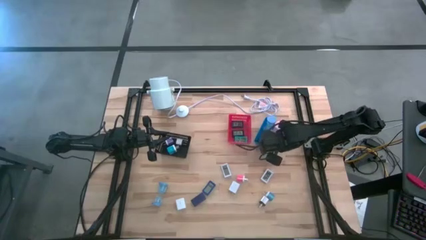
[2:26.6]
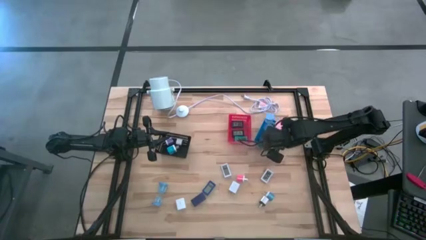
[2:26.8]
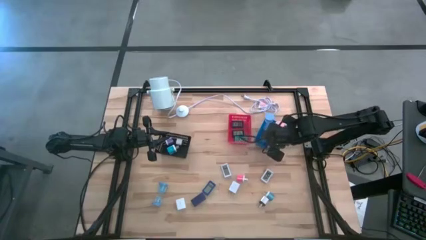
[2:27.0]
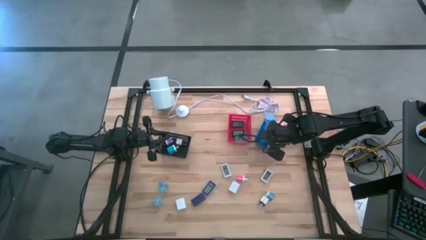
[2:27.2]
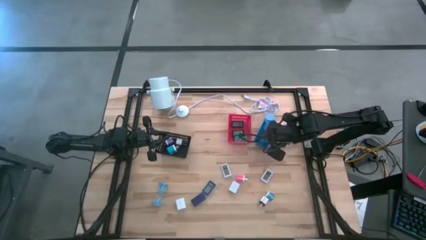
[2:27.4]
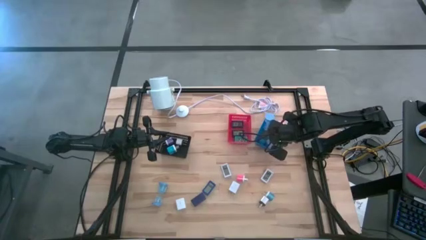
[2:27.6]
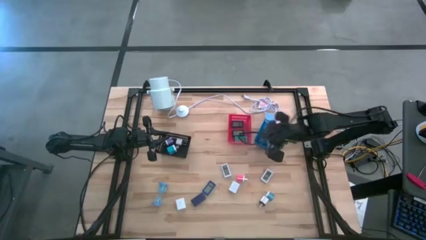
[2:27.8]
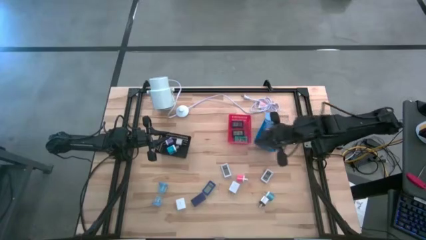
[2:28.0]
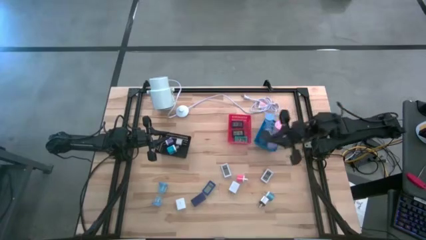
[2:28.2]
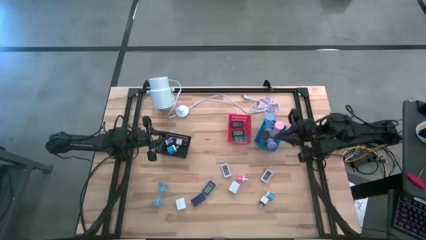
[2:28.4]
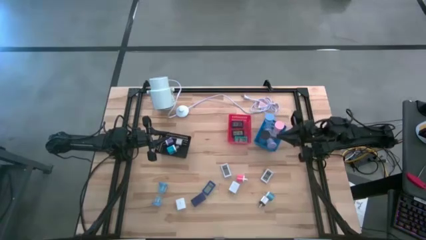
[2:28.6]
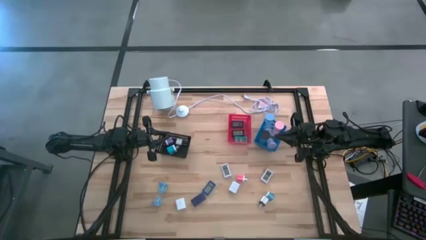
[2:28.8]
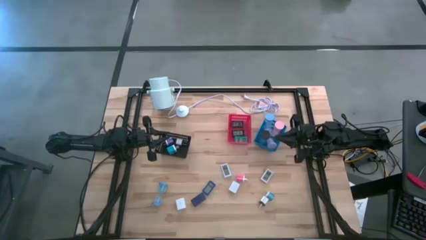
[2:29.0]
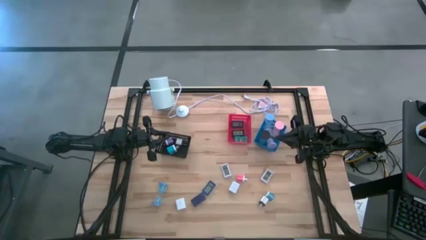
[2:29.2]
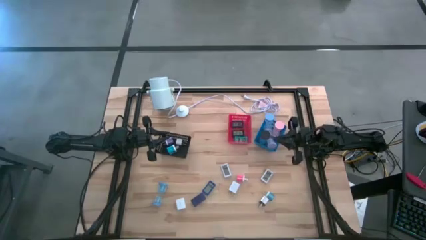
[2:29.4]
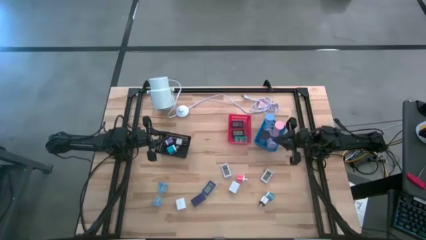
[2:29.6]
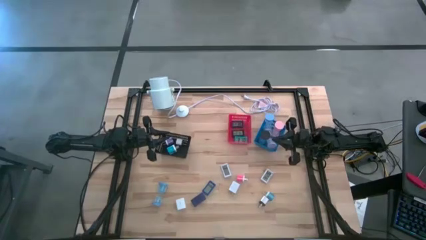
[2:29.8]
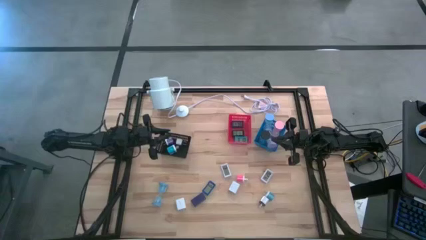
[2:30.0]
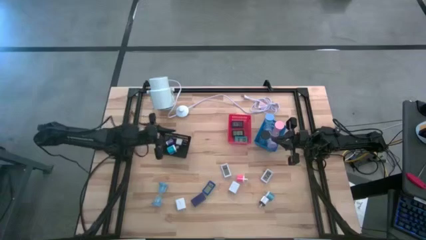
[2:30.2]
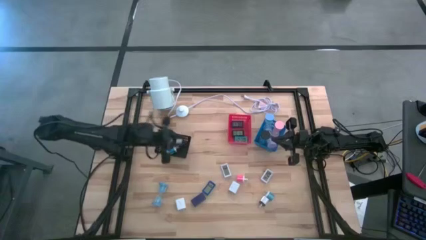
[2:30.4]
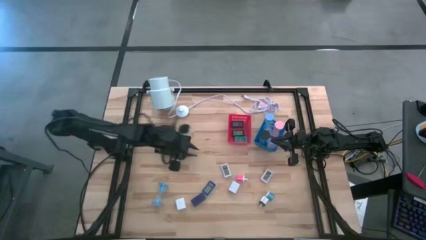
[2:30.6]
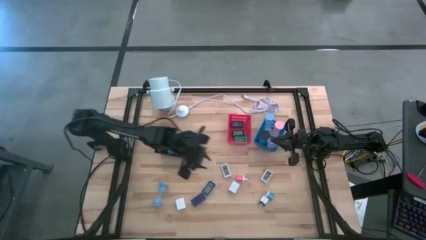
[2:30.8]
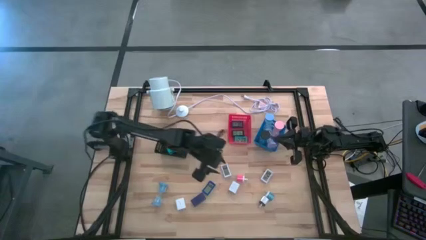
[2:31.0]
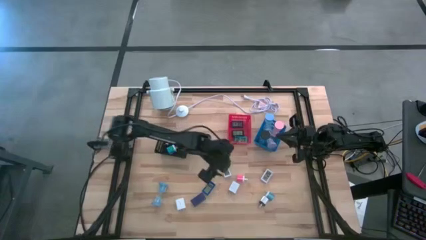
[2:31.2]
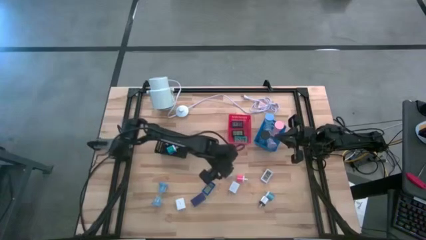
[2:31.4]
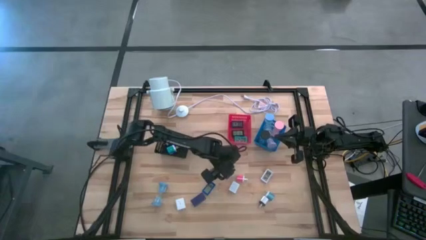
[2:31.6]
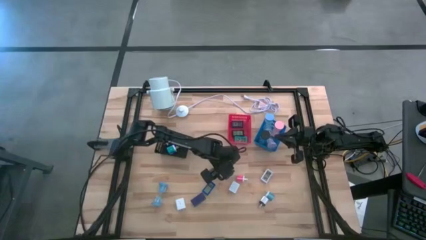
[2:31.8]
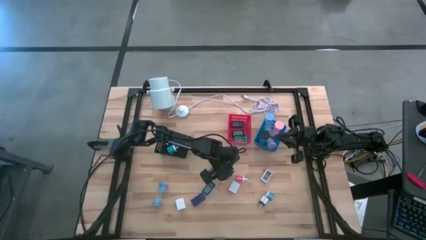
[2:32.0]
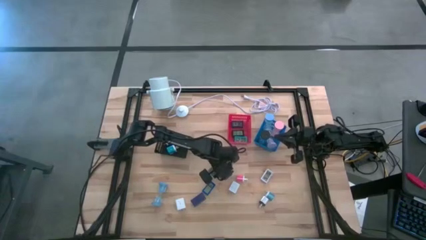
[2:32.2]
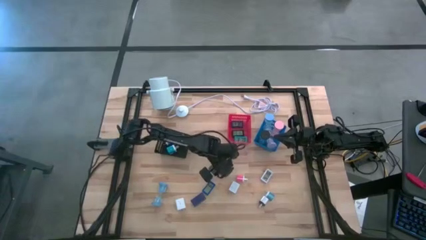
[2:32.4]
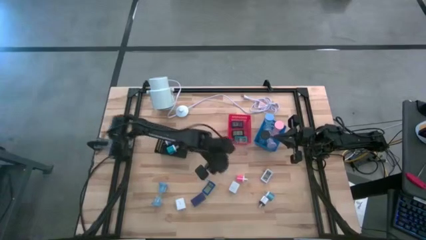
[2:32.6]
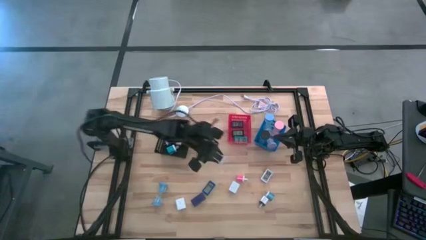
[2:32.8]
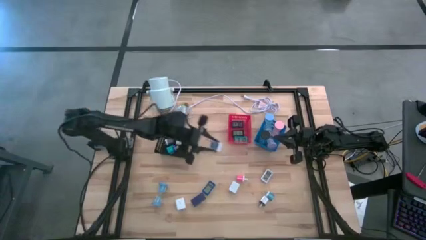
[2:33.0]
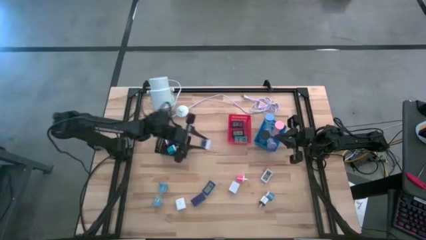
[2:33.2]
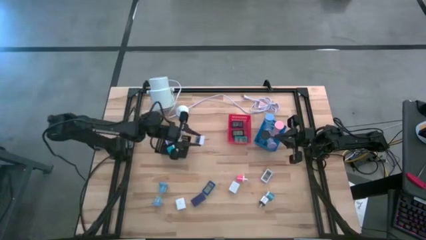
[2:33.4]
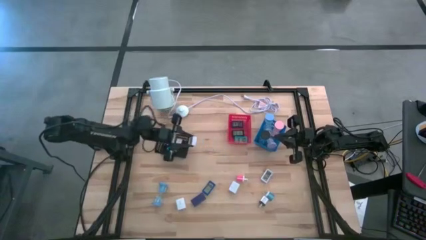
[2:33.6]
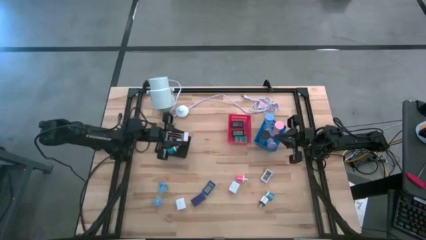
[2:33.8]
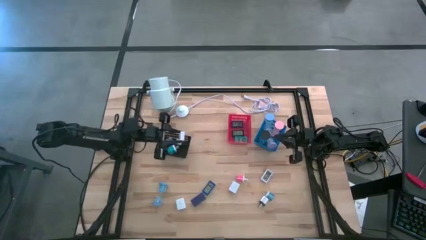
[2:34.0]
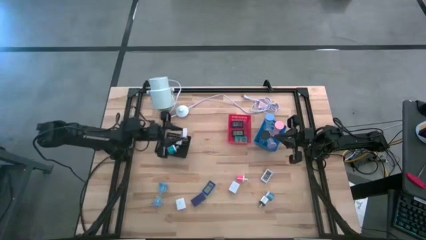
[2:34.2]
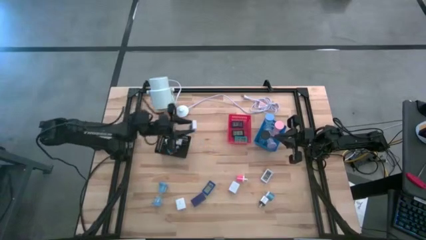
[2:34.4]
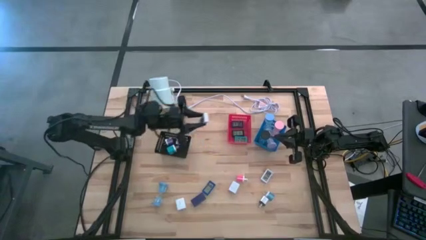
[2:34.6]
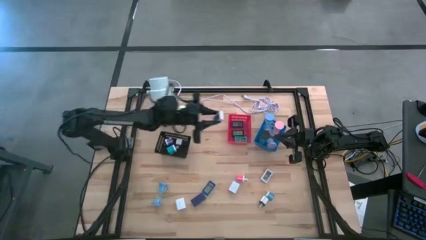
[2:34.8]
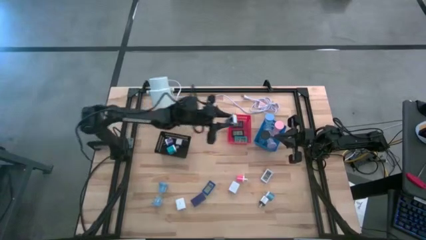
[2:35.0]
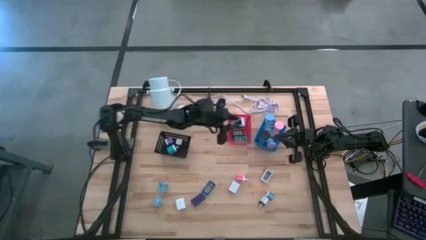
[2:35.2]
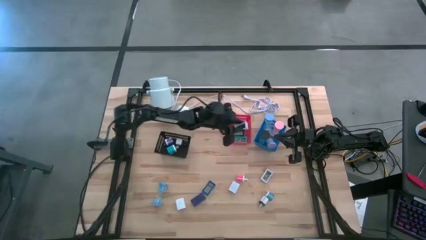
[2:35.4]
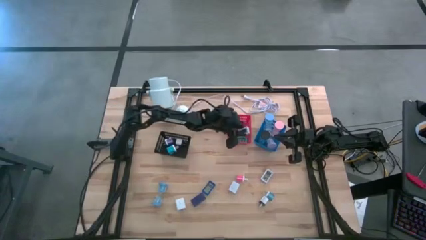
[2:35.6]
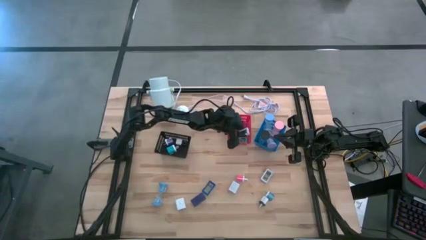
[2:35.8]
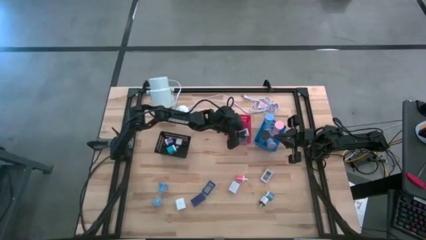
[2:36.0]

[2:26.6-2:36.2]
Task: Pick & Place Office items
Put the white digital clock into the red bin

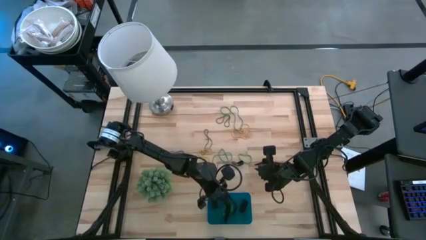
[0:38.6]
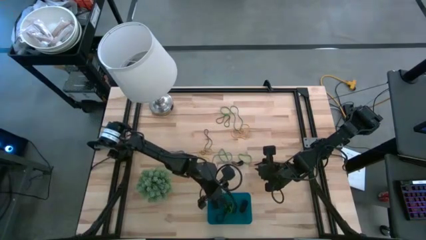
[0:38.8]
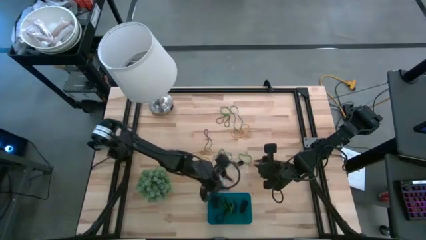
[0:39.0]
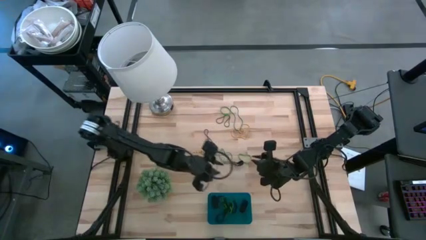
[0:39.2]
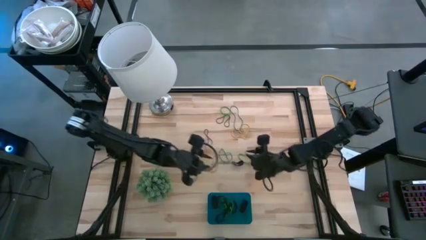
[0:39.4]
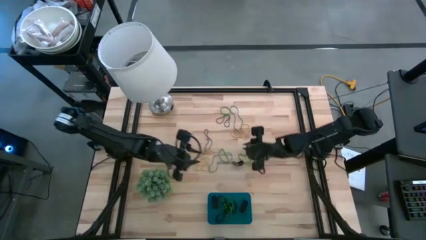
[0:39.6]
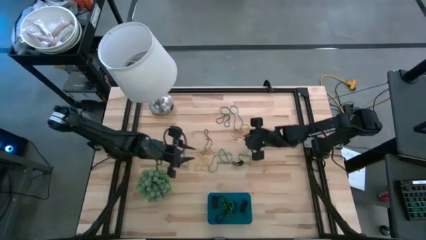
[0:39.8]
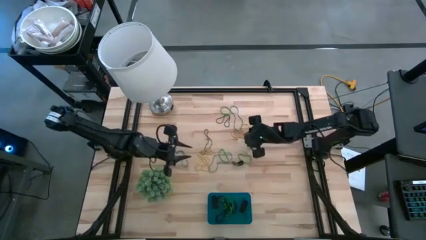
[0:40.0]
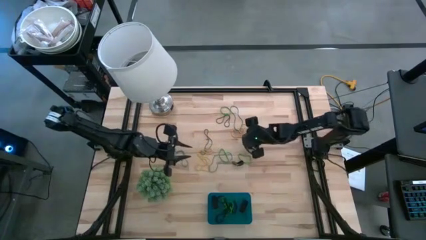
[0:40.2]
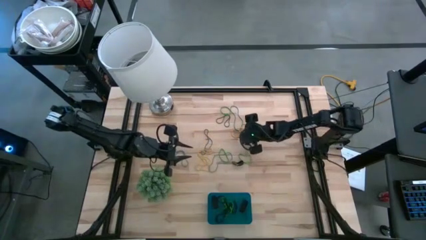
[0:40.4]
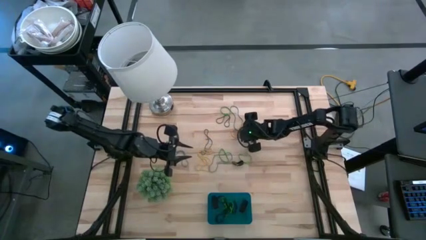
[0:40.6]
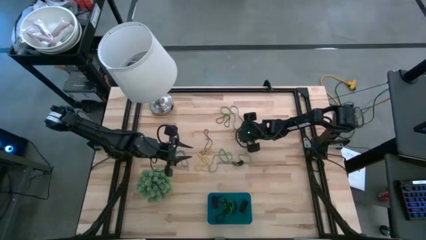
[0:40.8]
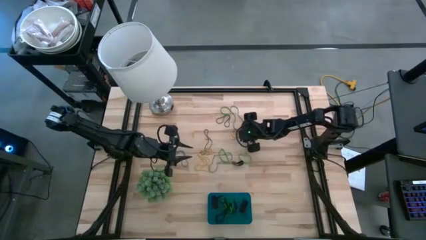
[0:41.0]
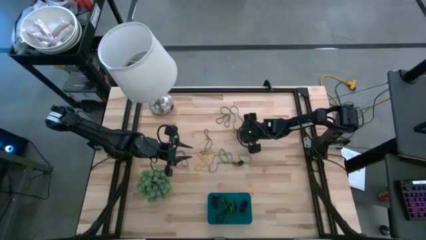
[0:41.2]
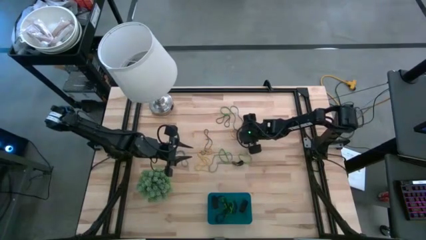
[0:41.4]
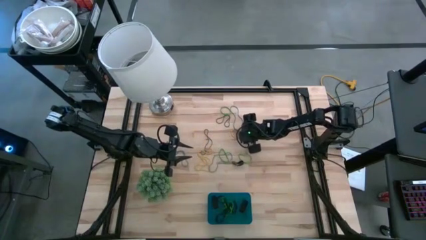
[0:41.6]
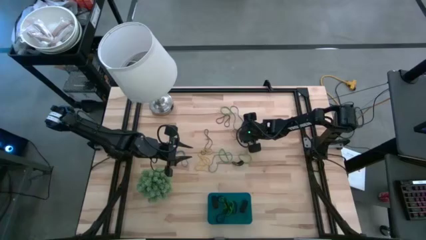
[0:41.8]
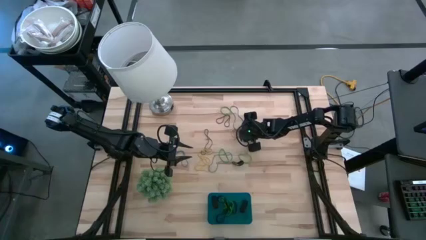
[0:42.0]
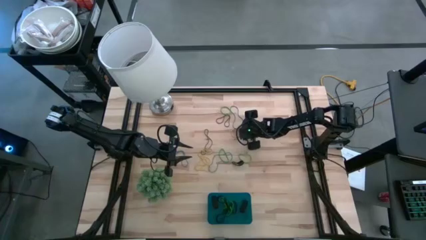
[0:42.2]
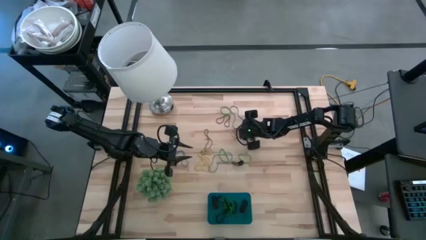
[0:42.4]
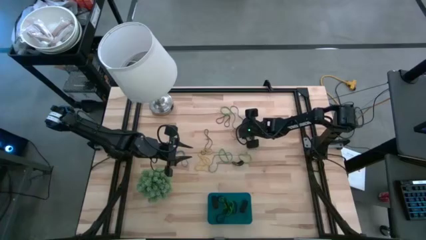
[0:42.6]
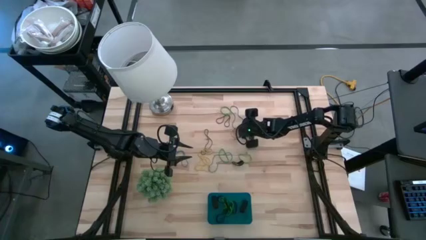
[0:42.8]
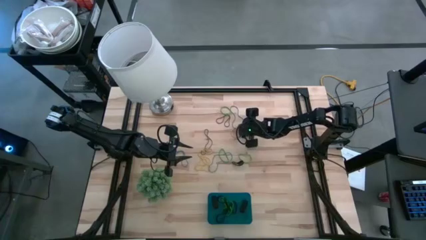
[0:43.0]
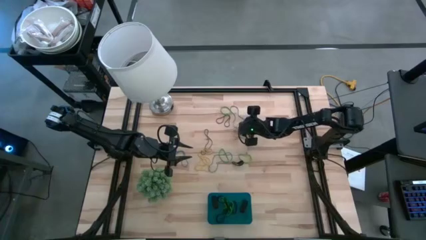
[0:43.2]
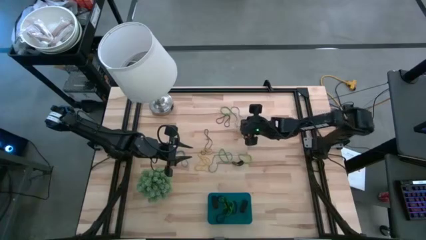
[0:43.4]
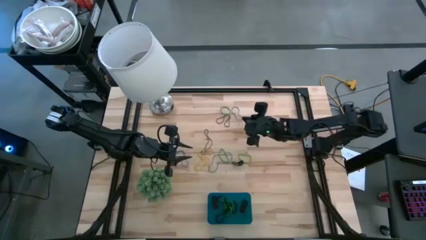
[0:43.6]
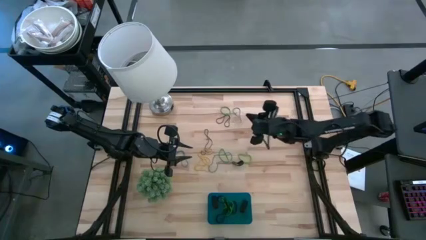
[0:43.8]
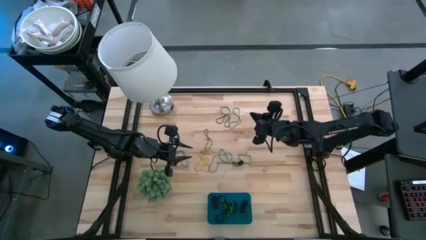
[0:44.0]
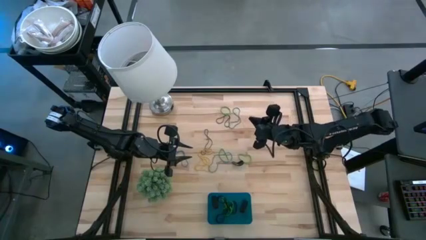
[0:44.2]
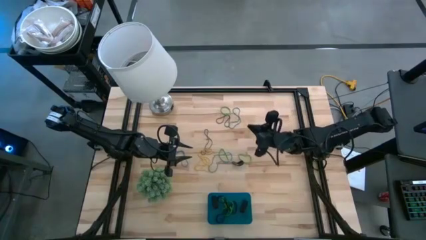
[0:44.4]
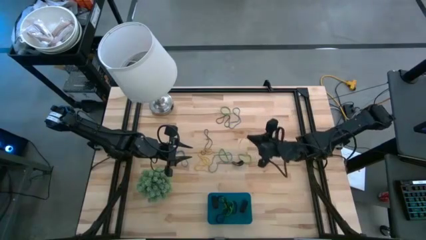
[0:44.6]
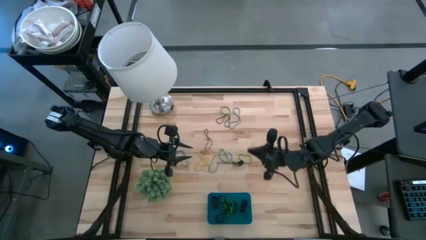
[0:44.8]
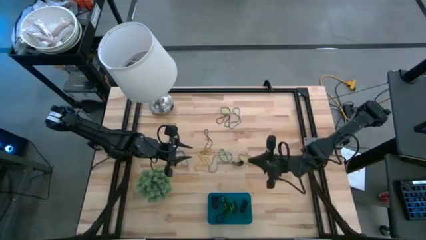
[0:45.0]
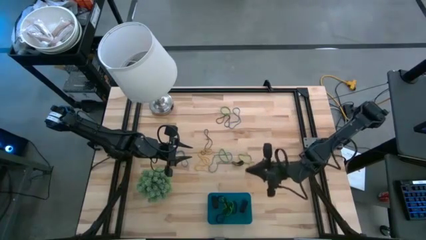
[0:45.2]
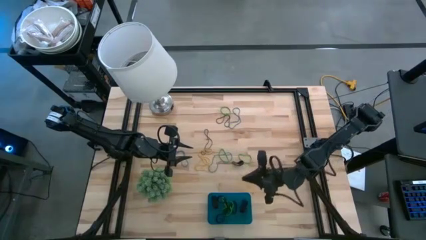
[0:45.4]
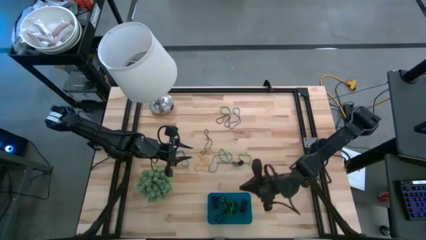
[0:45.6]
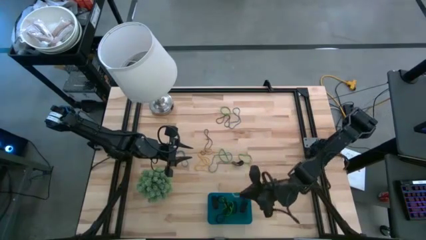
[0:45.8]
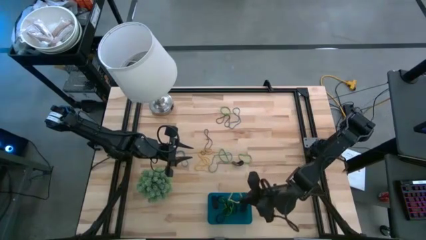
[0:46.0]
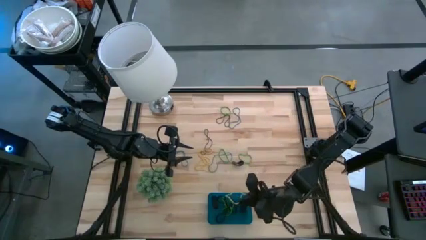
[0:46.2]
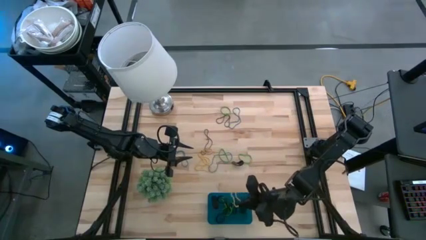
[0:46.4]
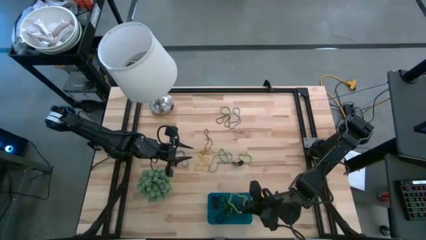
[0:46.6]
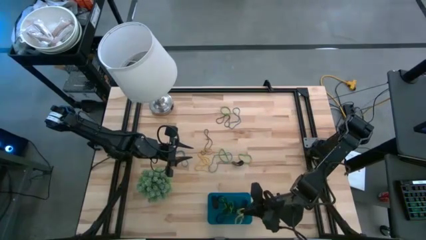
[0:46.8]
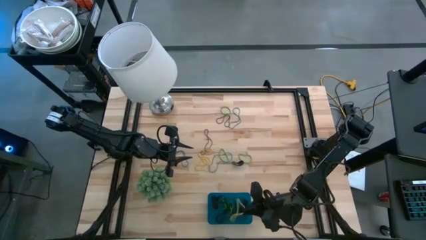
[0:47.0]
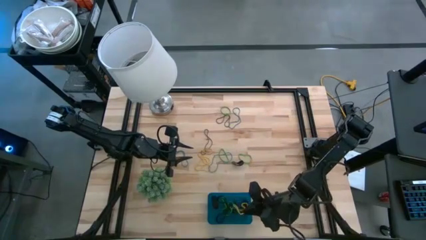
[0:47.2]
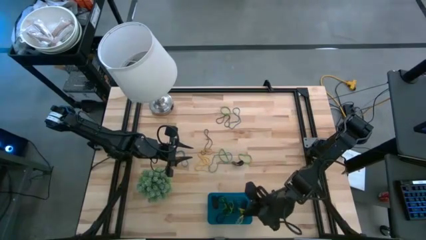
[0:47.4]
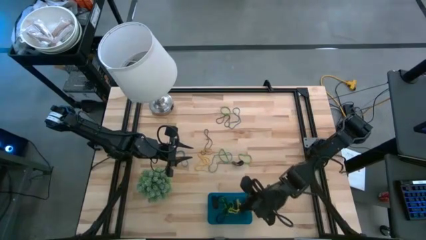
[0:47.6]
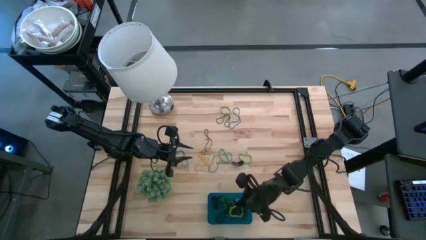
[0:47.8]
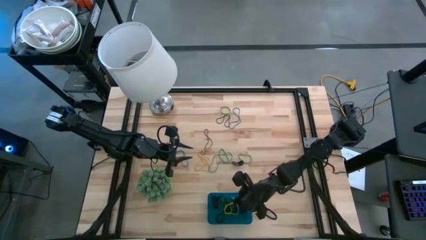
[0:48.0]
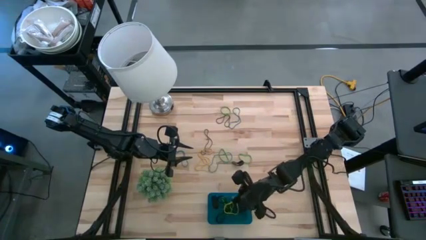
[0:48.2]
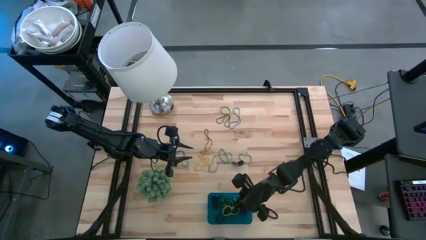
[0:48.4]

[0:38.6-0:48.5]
Task: Pick and place rubber bands into bin
Put the yellow rubber band into the blue bin
